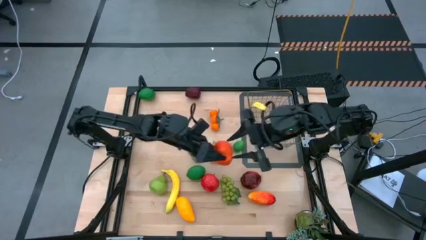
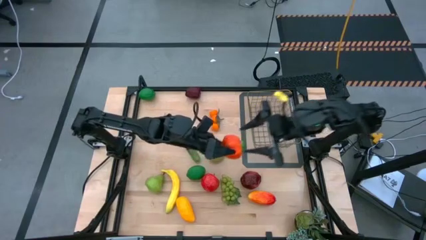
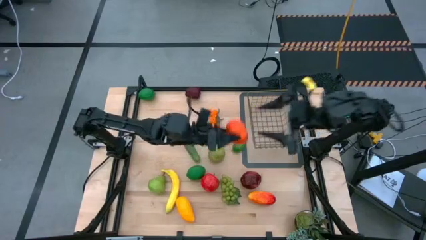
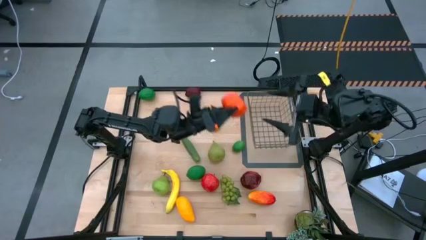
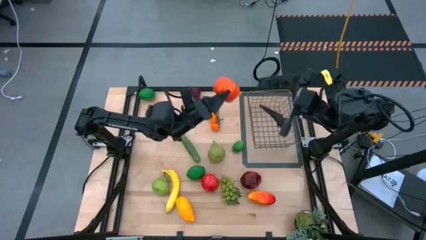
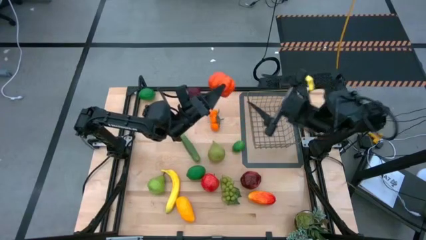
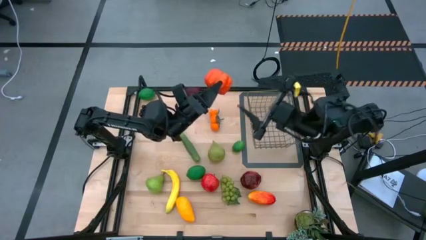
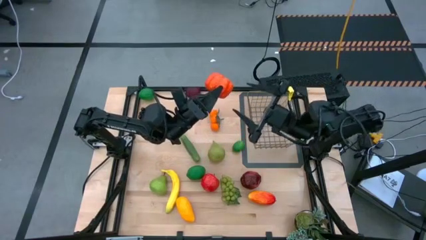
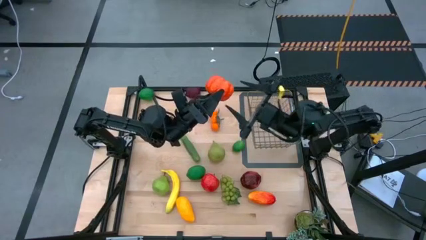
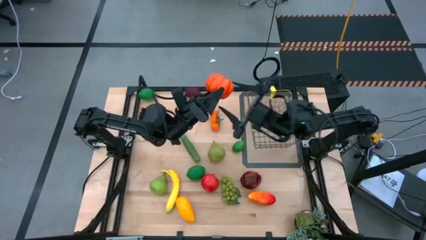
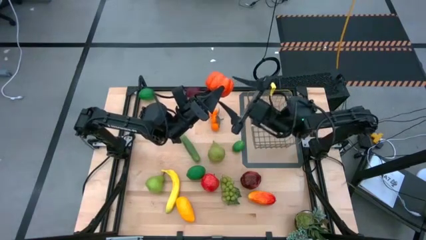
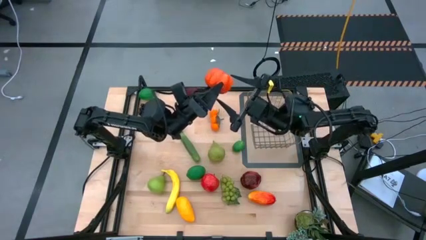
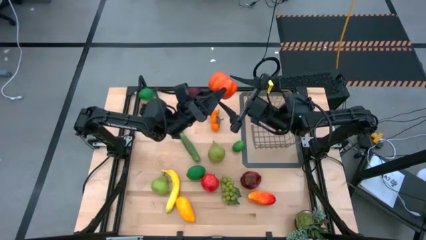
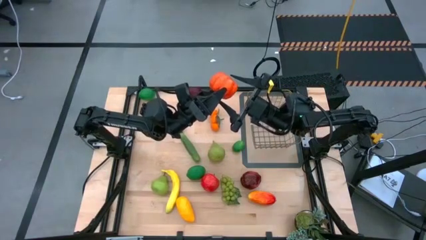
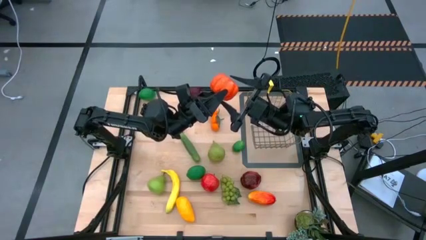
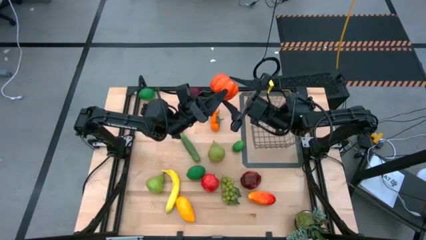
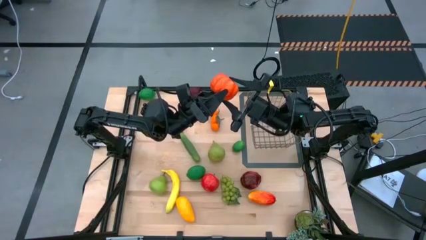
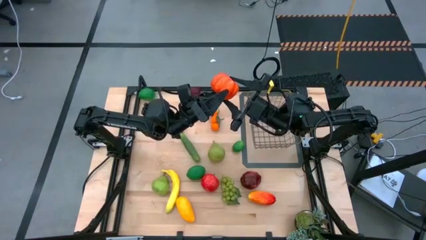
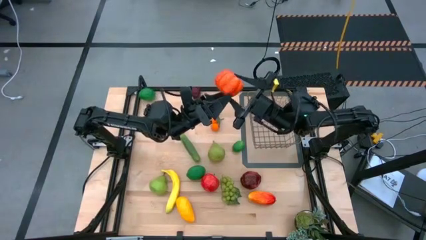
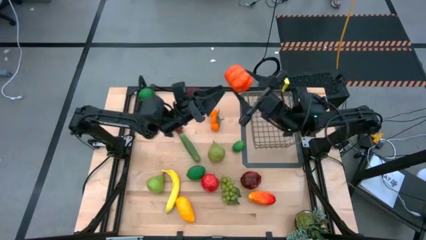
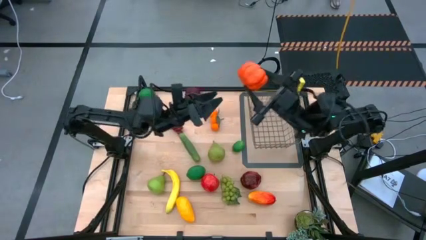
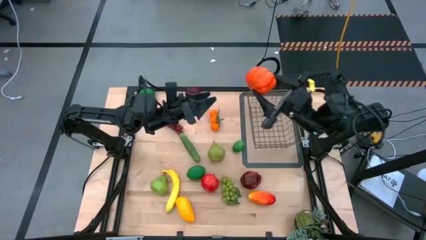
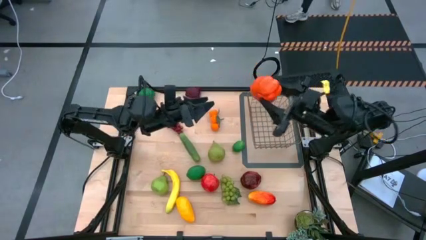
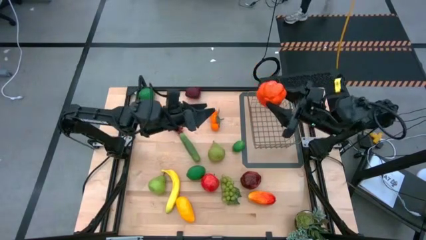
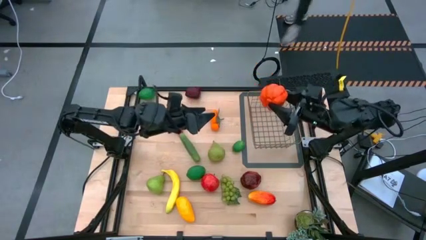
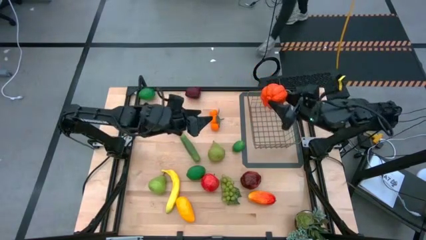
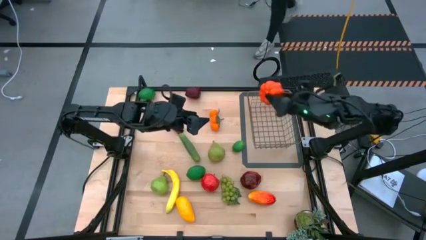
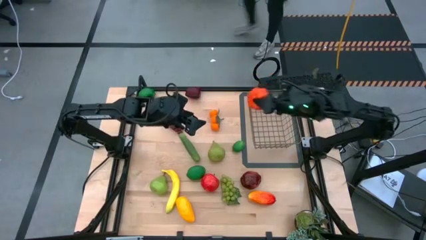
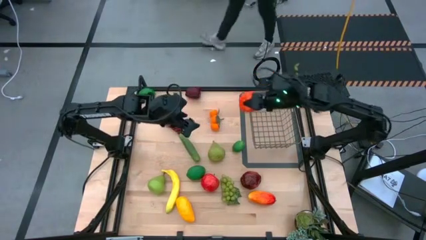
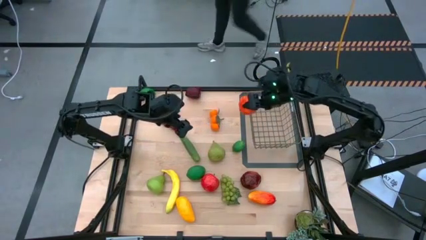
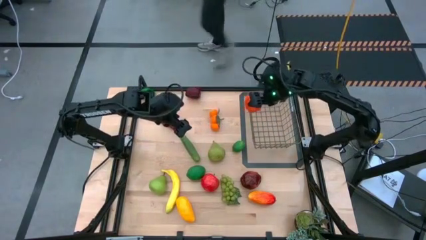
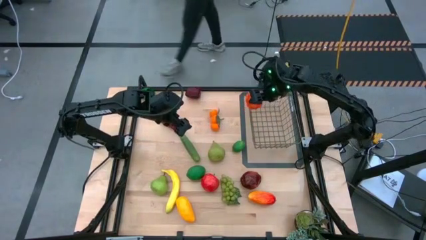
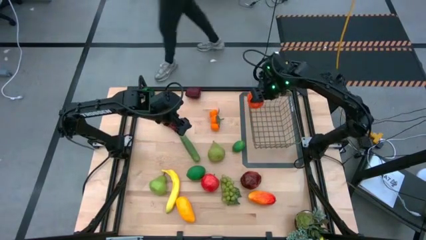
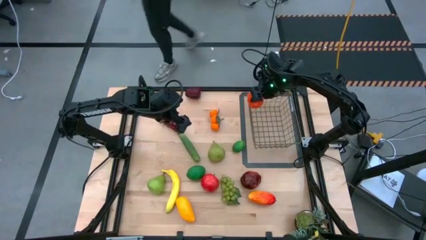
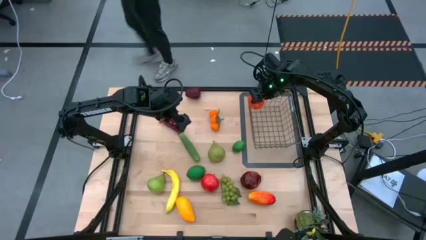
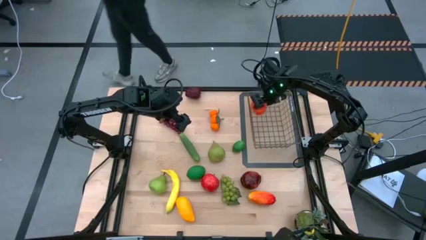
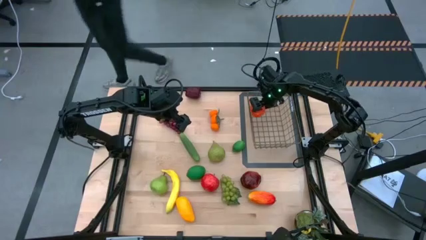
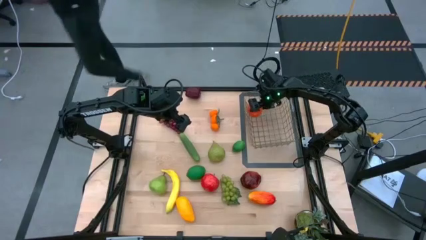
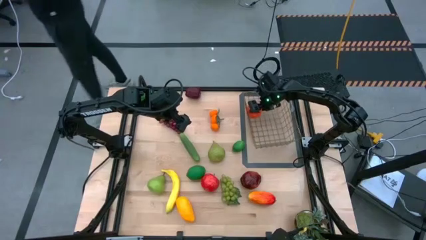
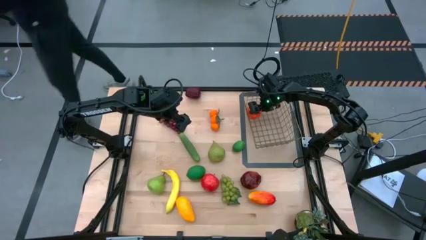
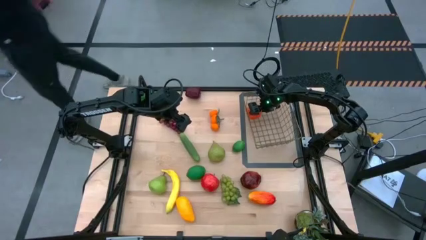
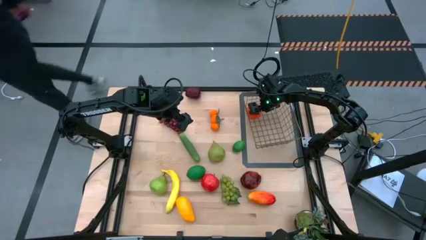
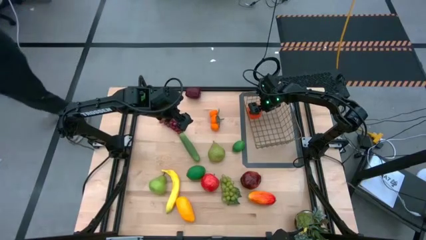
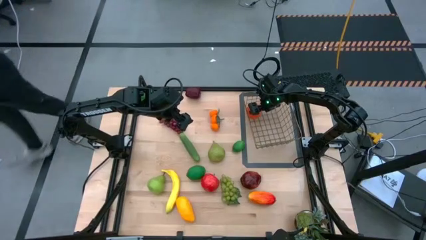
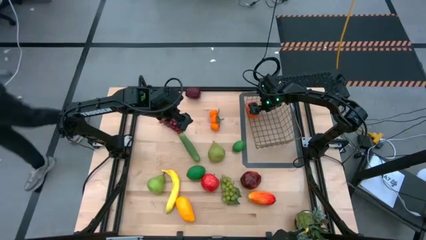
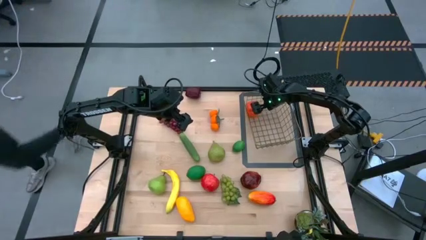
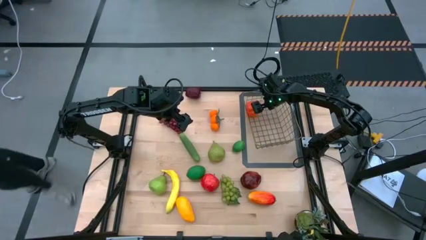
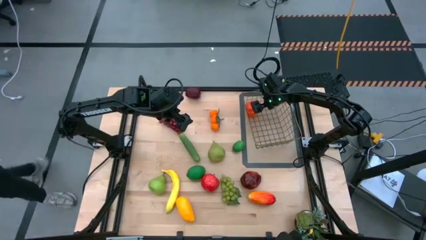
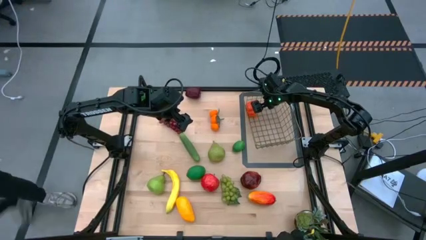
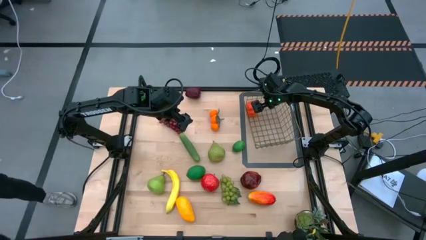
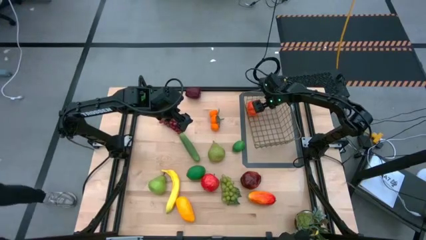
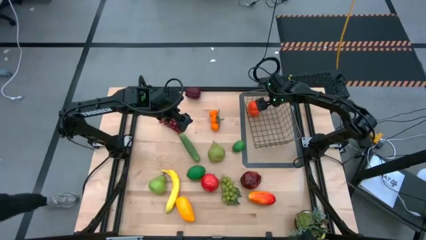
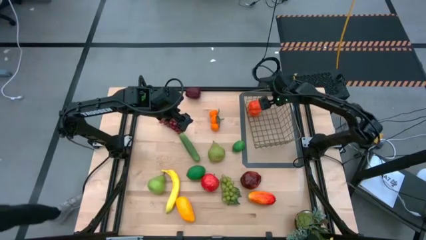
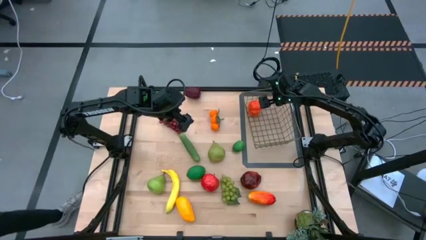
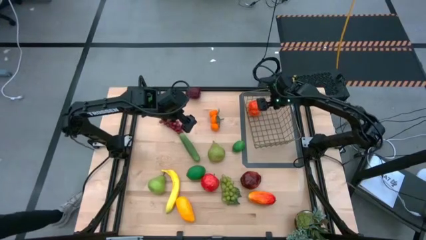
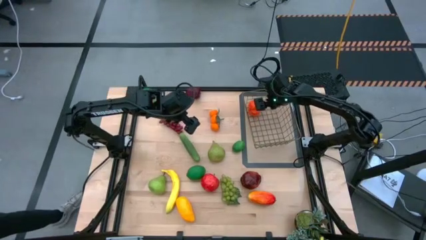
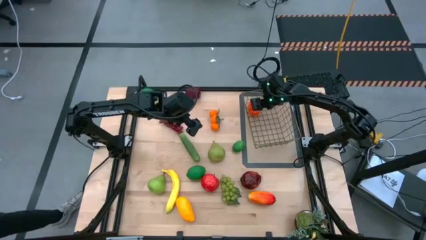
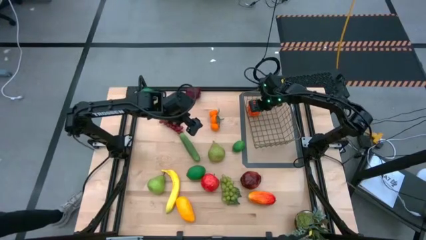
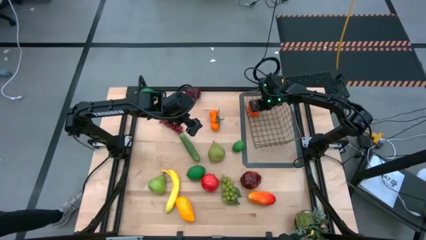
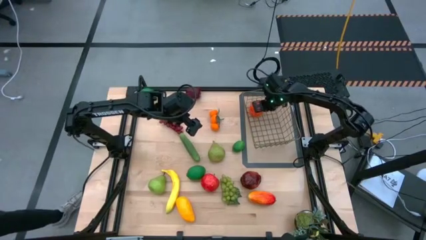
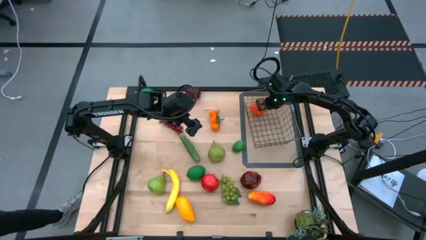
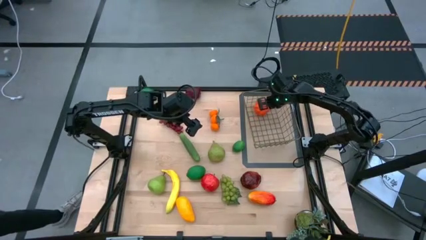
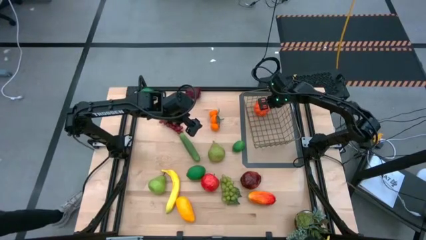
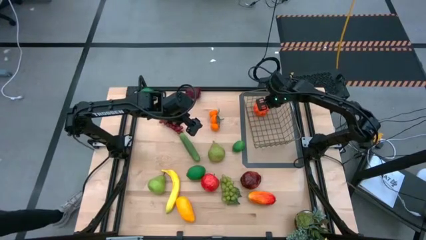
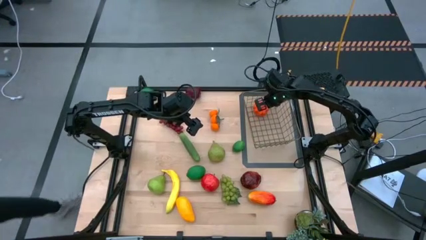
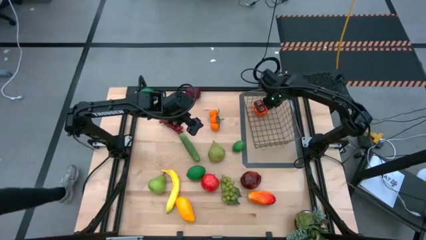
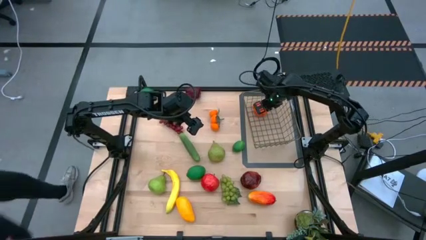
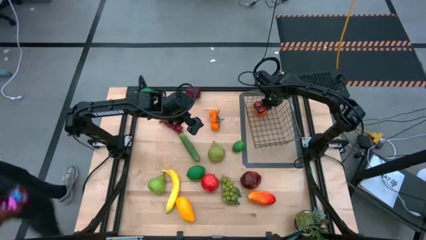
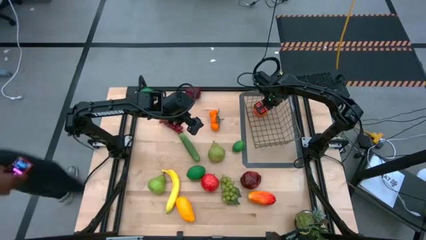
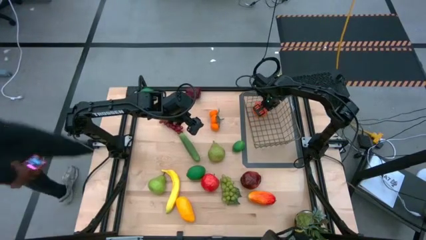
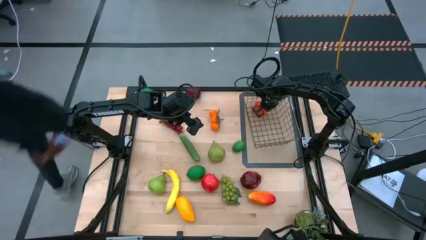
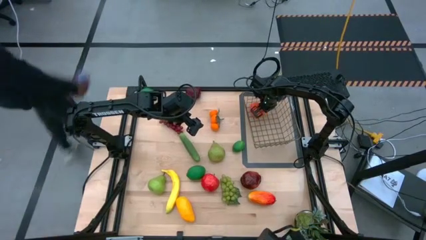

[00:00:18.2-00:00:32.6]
Task: Build produce basket
Put the orange pumpkin into the wire basket

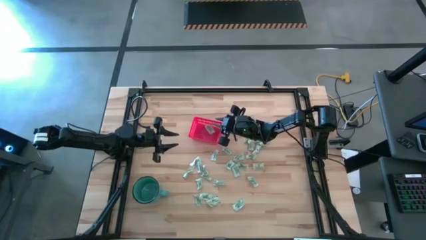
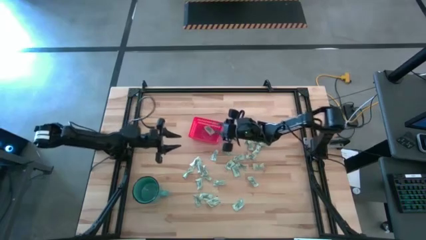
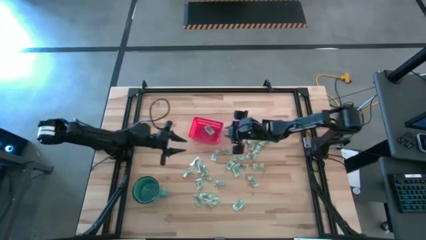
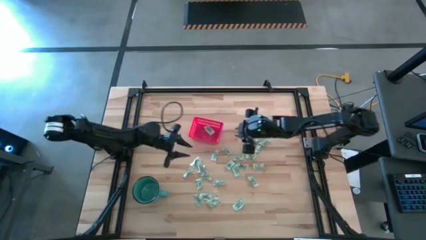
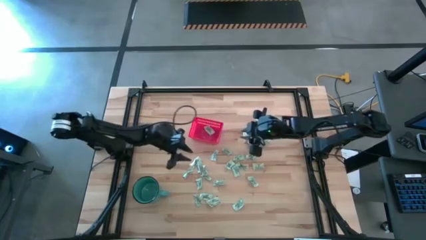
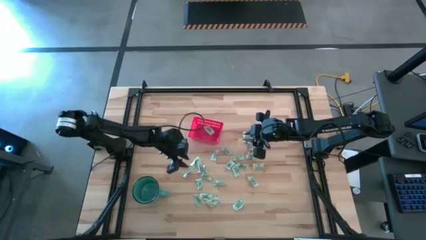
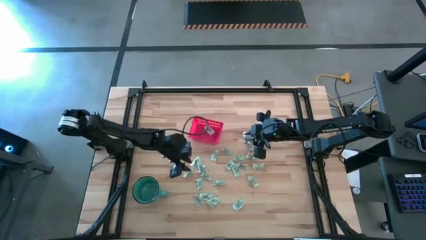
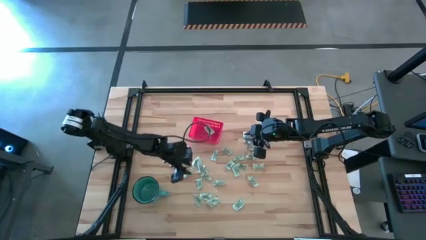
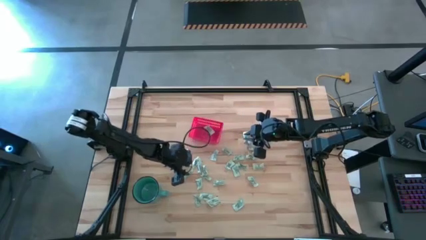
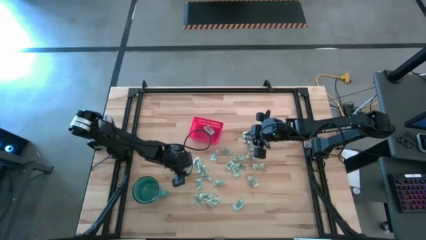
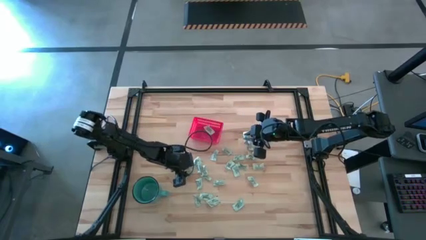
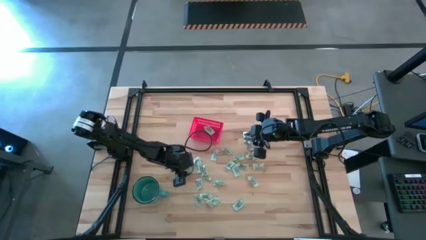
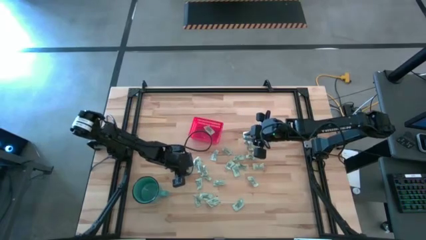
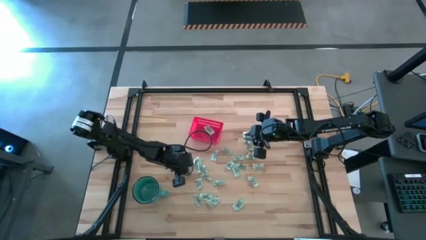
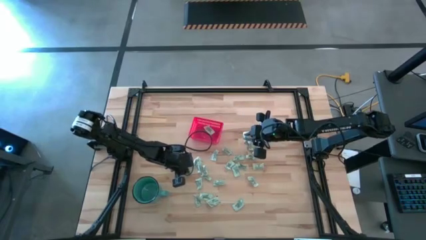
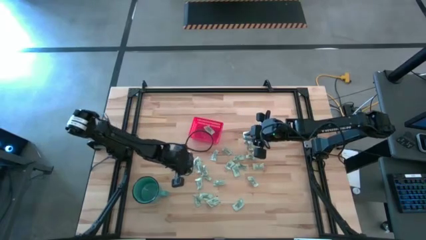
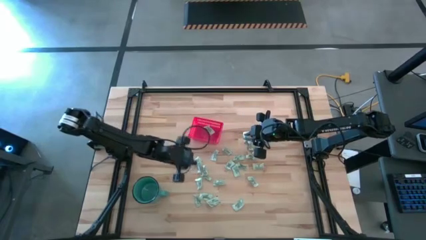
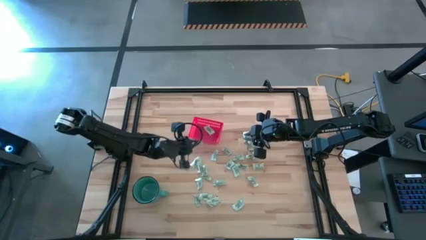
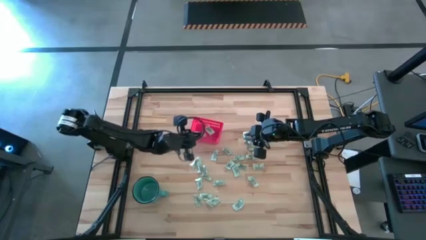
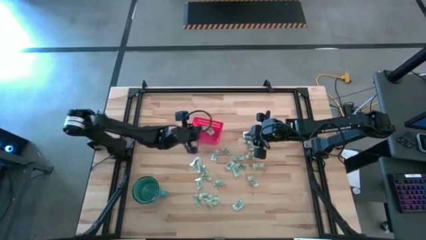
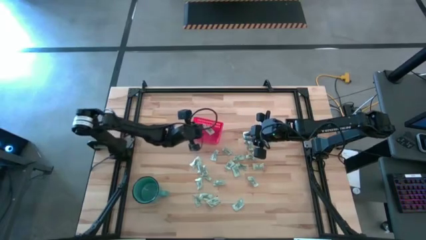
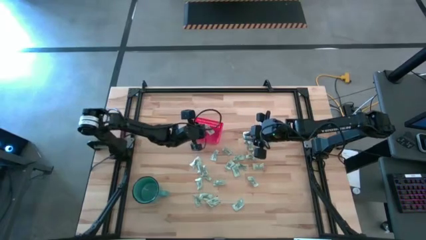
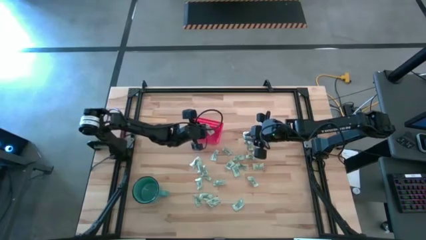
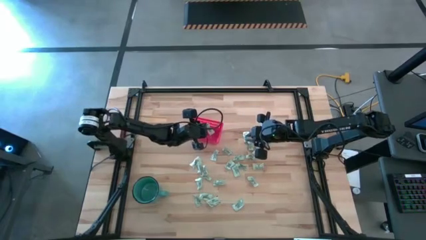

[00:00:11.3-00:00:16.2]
Task: Pick and place items into bin
Put the stevia packet into the red bin
